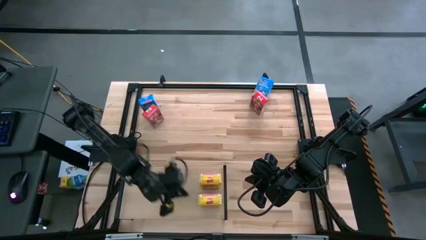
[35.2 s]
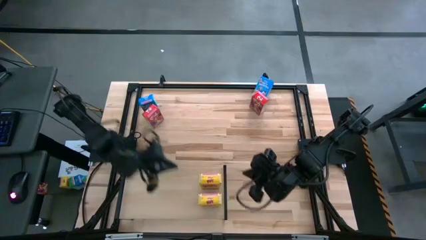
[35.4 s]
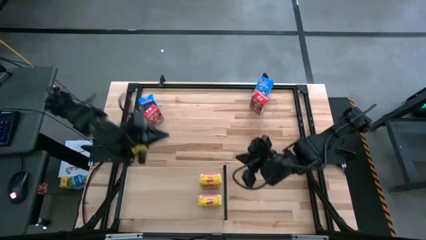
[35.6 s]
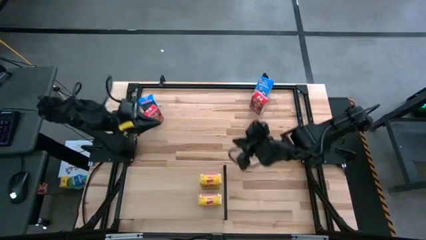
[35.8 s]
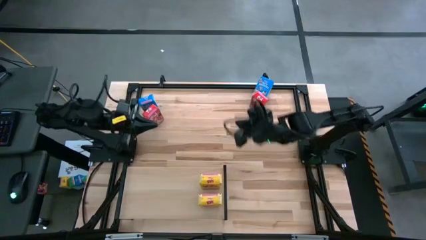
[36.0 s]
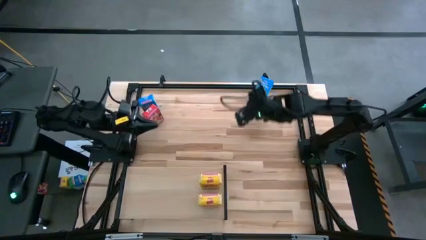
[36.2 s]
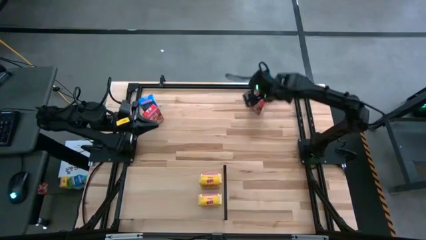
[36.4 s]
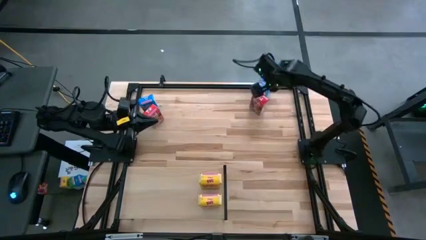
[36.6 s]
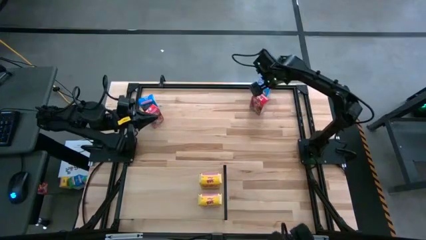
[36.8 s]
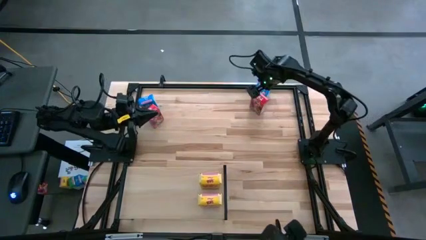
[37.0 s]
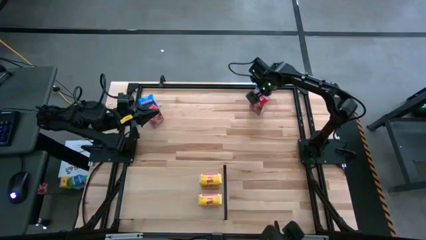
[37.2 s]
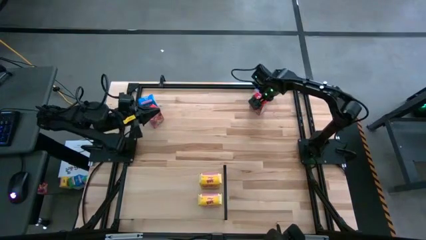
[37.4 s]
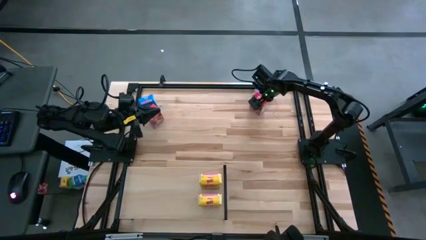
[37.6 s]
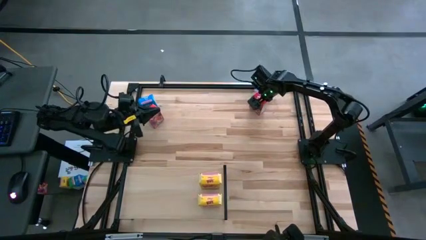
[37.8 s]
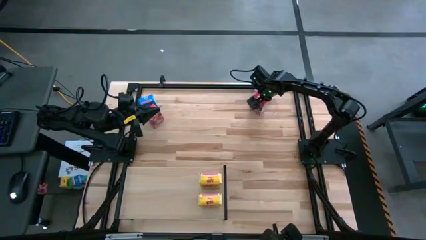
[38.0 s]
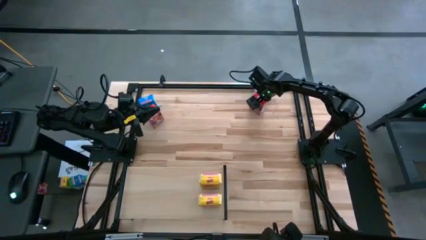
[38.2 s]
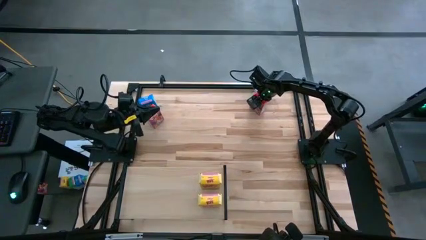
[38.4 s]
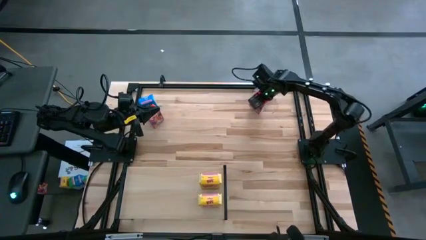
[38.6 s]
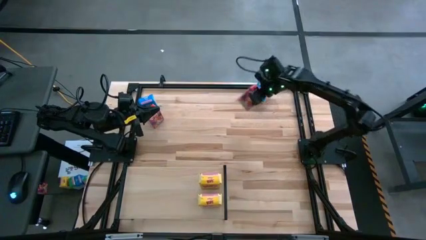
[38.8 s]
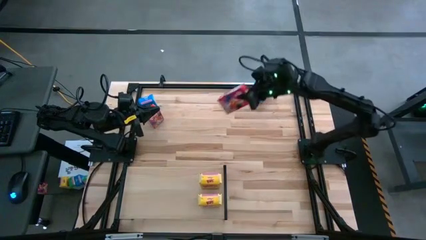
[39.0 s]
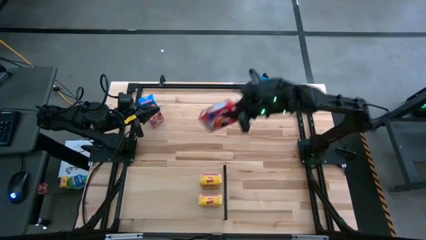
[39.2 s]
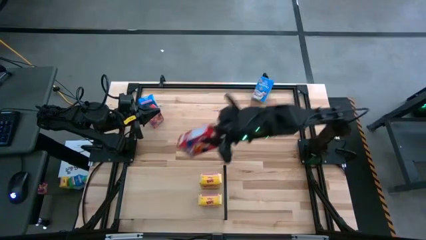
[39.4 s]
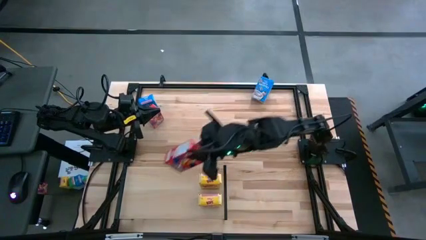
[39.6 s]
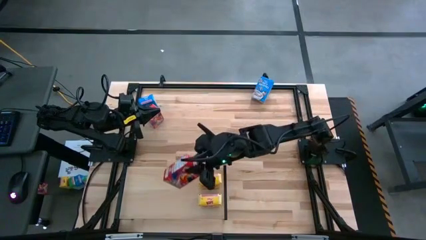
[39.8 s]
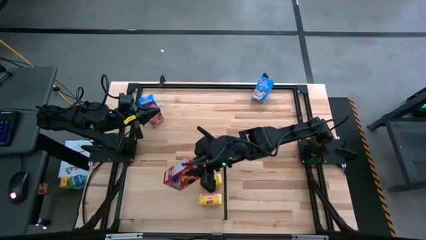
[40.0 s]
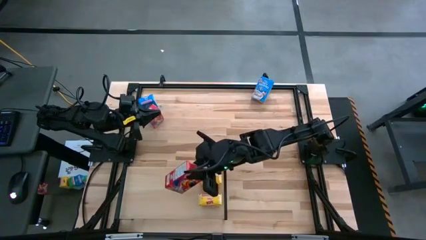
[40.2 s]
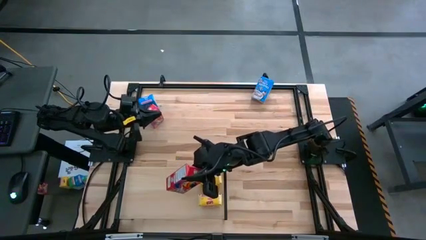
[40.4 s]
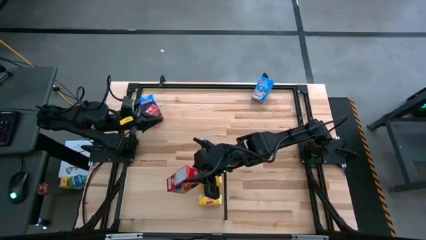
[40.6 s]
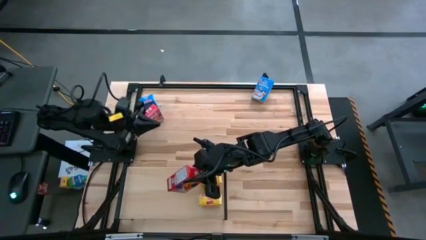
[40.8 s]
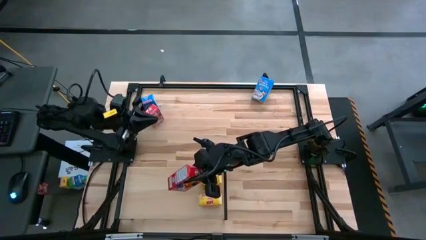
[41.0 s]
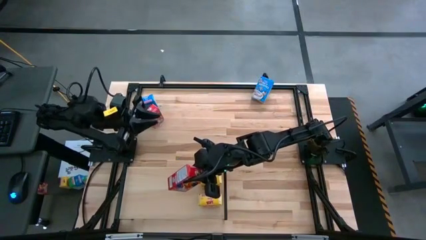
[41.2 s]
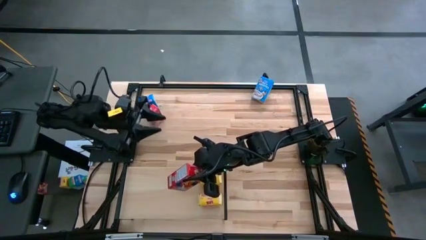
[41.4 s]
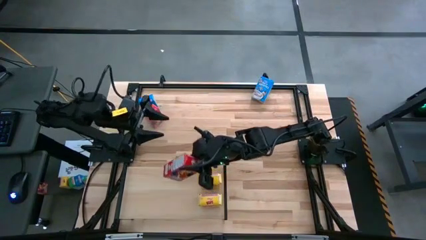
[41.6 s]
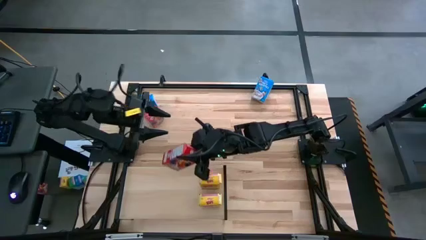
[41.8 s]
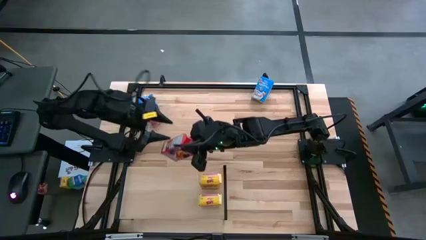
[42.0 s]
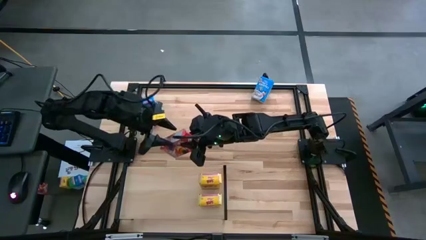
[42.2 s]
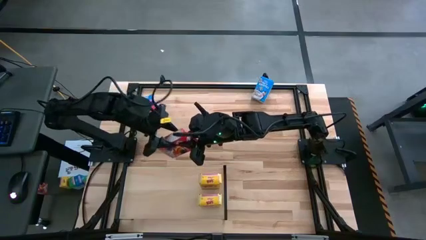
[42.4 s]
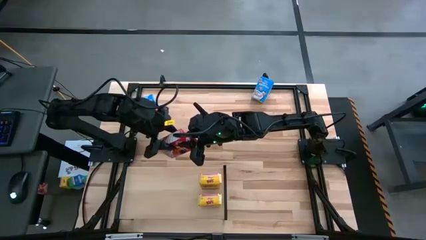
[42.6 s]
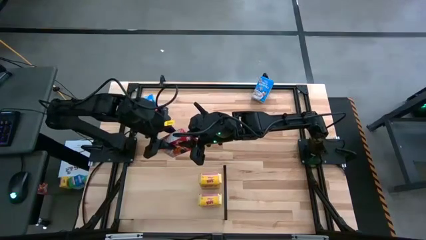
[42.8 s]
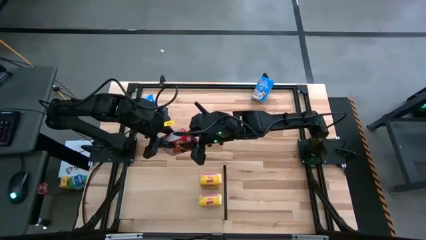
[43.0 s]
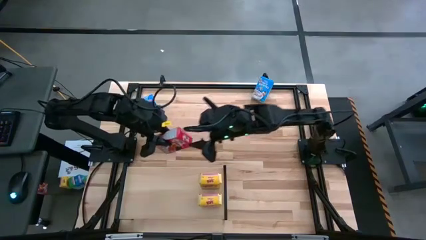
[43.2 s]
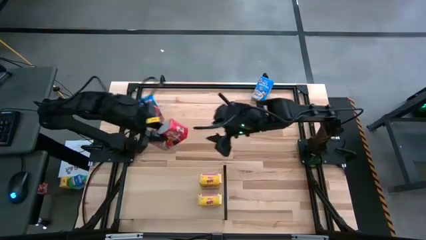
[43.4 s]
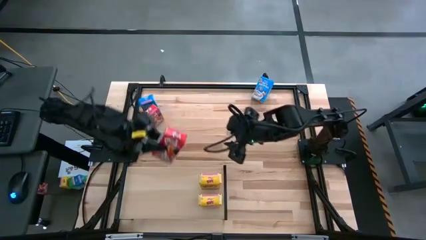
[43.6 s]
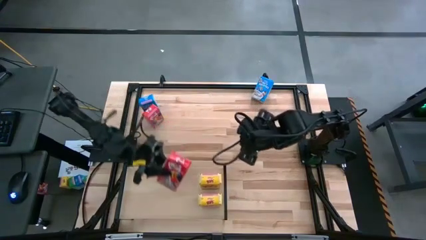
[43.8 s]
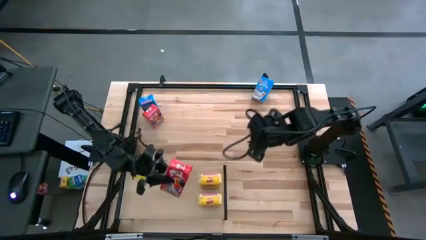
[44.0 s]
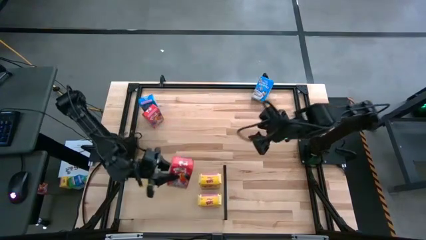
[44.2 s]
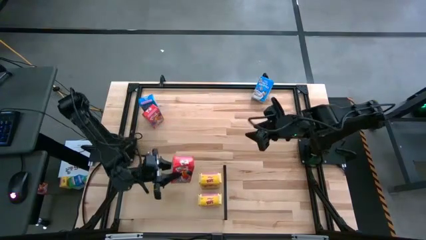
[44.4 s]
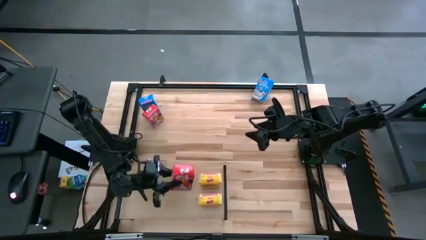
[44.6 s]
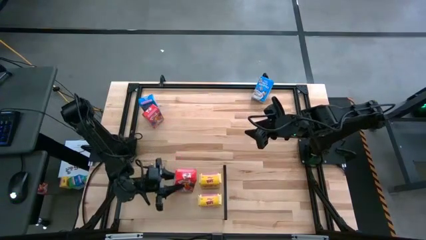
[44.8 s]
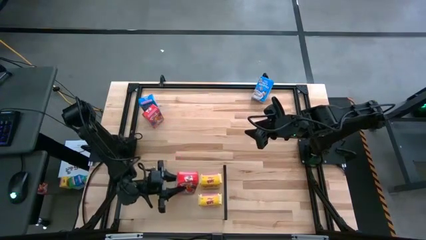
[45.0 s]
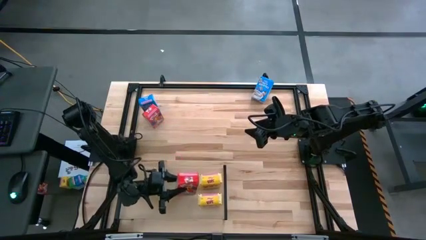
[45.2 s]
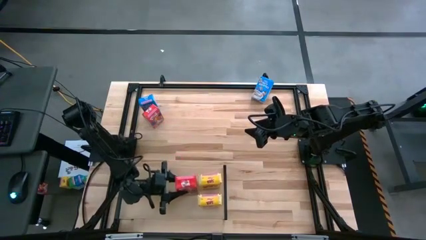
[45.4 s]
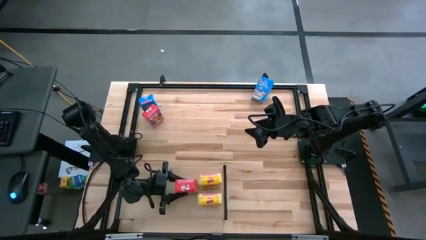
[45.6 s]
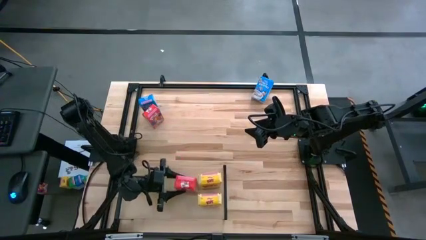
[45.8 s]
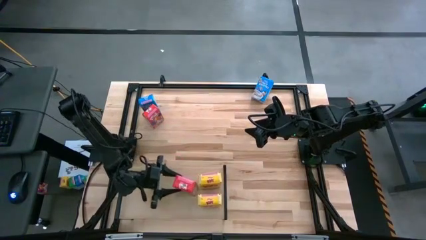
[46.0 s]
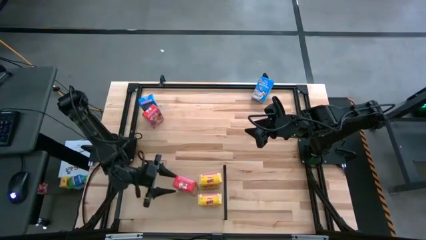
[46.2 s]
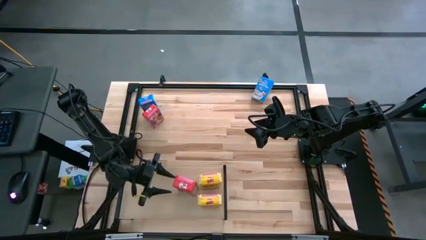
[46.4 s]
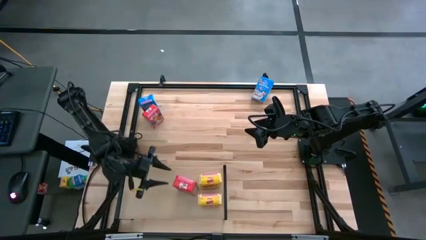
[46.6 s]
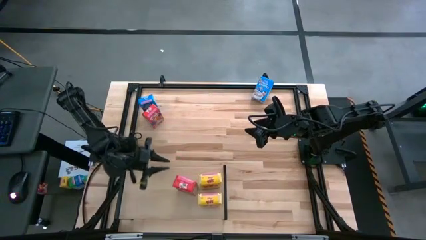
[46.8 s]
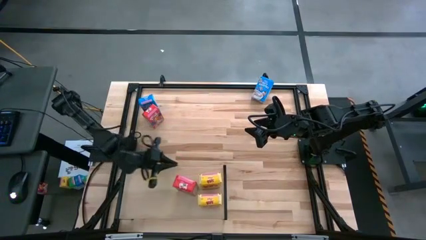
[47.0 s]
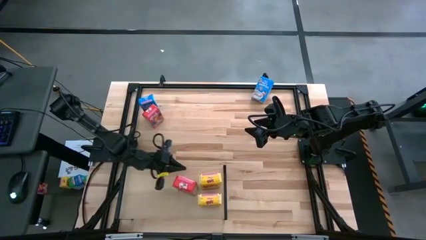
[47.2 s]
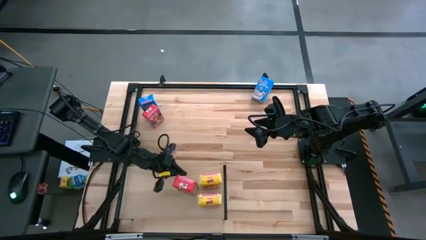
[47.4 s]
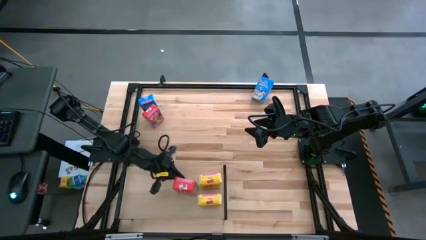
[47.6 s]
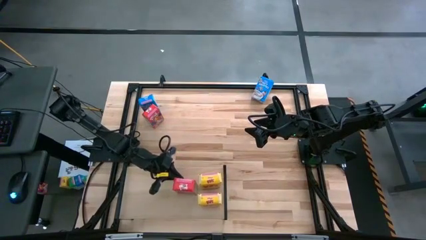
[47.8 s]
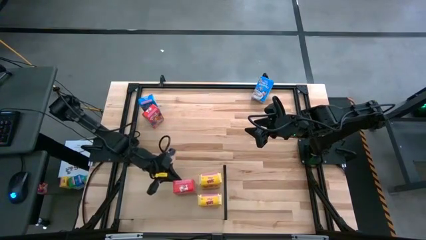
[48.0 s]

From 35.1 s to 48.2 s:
Task: Stack cereal on shelf
Put the right red cereal box on the shelf

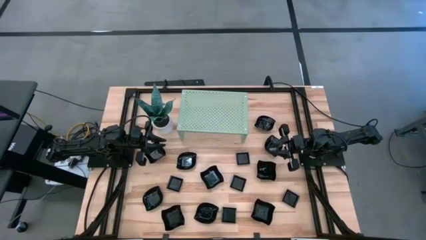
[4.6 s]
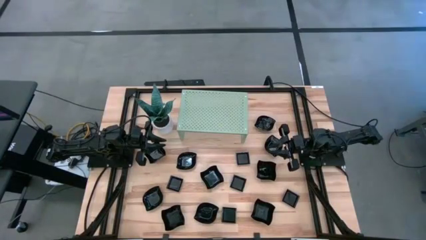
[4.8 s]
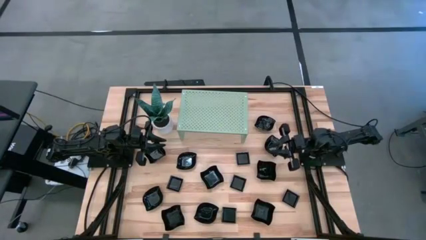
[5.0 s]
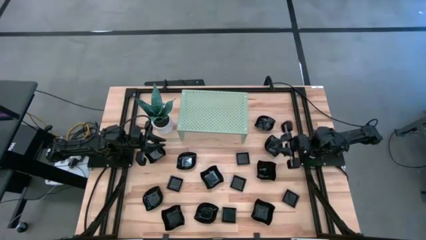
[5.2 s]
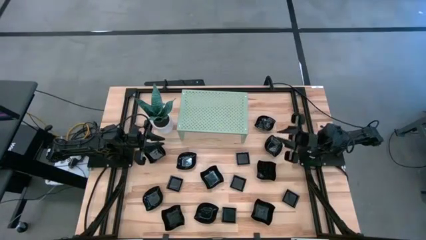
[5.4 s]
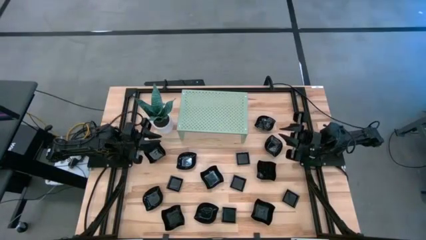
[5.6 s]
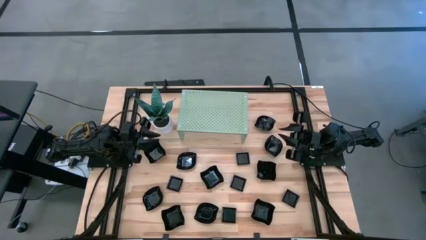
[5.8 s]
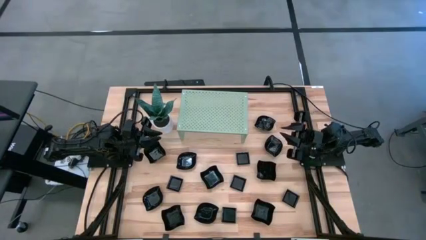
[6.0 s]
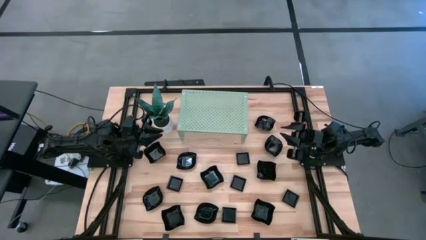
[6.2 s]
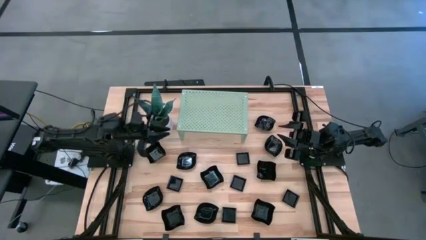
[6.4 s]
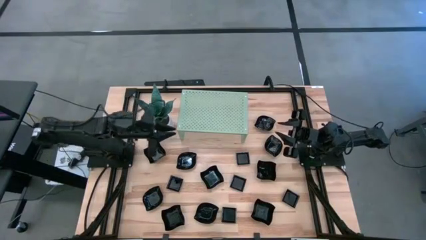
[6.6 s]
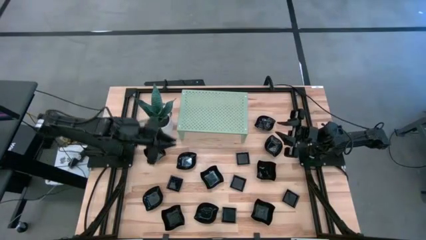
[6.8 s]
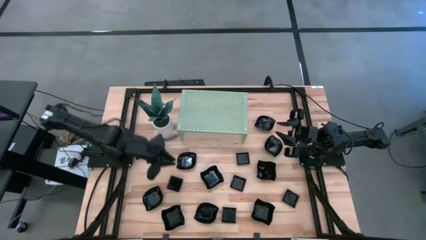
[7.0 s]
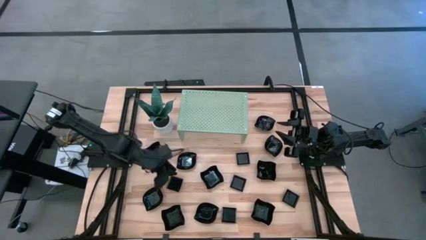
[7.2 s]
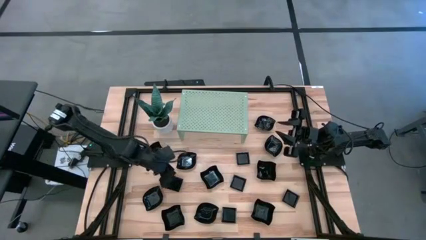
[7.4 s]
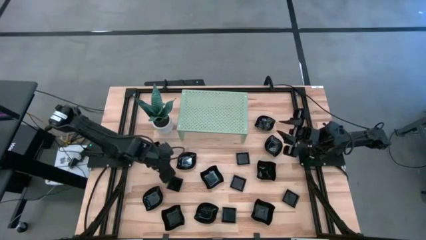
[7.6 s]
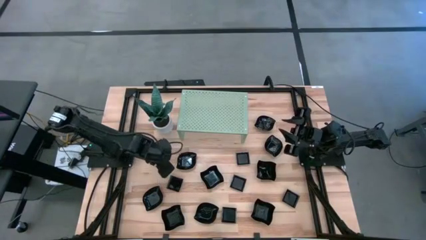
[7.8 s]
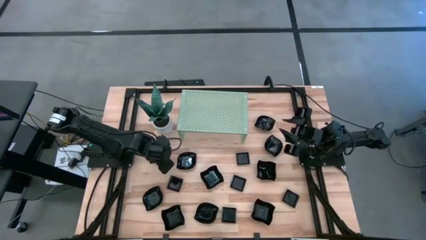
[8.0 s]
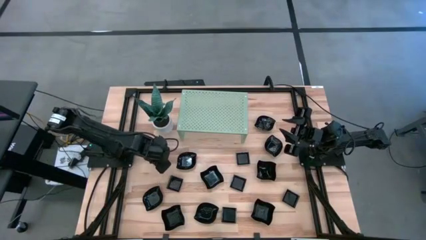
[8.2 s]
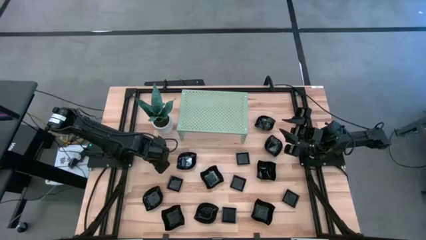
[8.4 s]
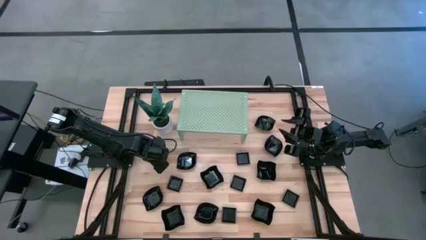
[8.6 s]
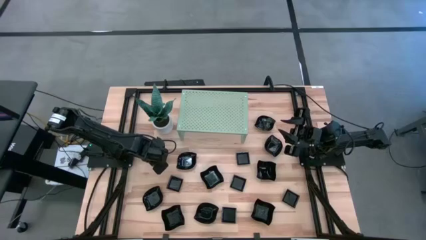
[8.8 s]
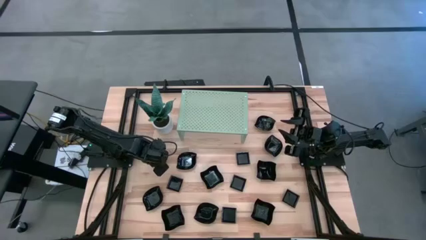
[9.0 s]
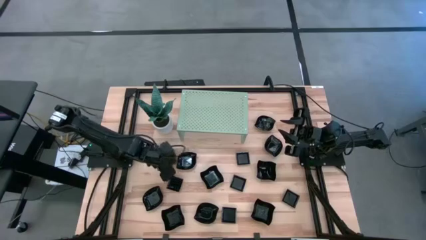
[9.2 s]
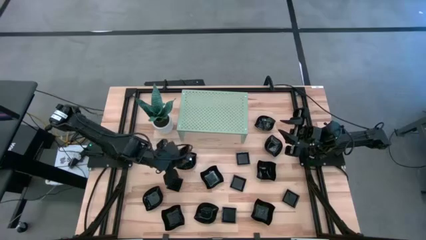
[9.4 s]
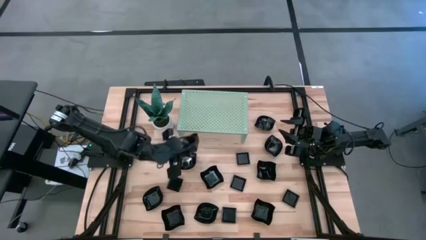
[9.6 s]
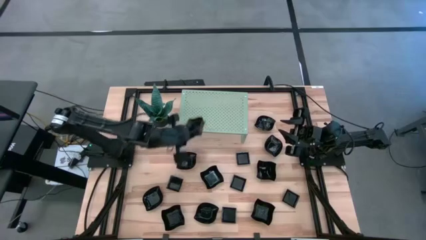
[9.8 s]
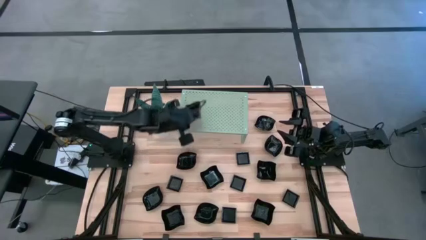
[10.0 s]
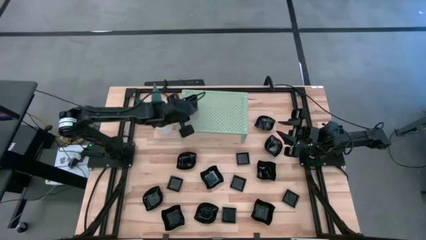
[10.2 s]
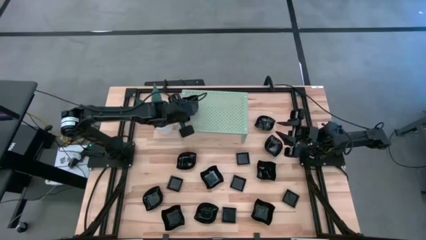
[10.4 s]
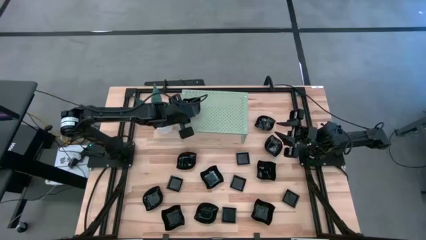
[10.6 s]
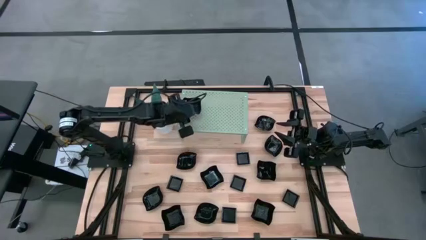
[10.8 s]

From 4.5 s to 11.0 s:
Task: Pick & Place Mini shaped plates
Put the distorted square plate on the shelf
